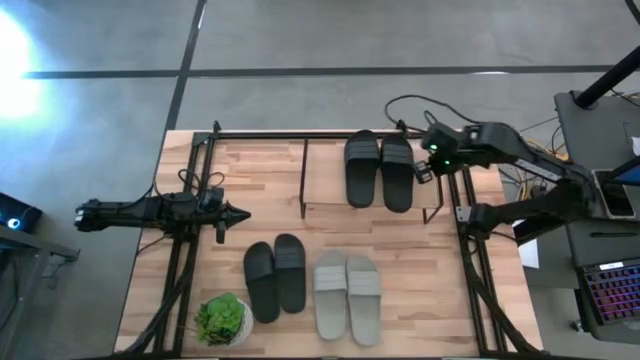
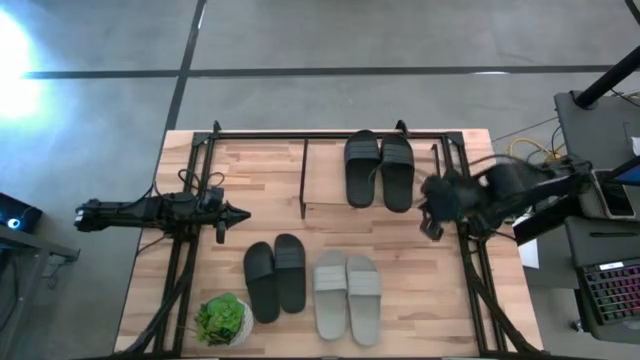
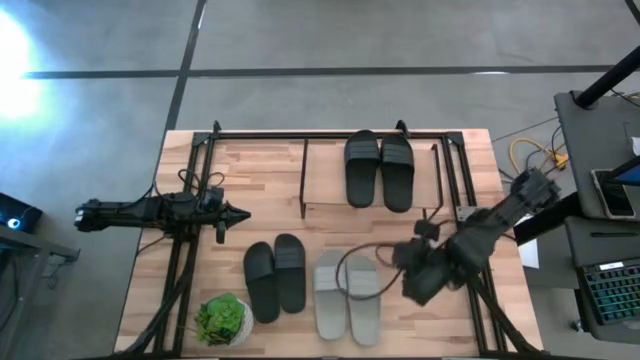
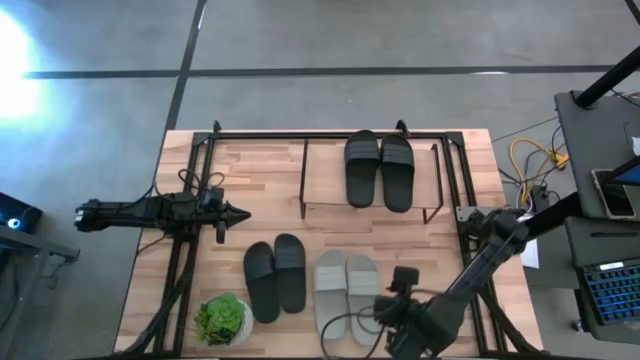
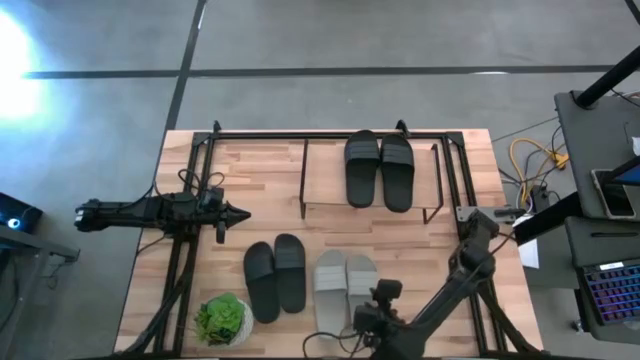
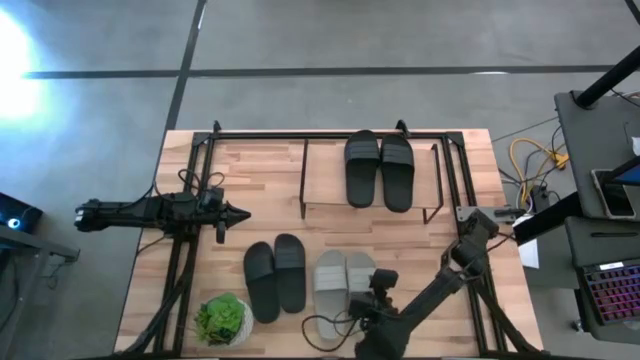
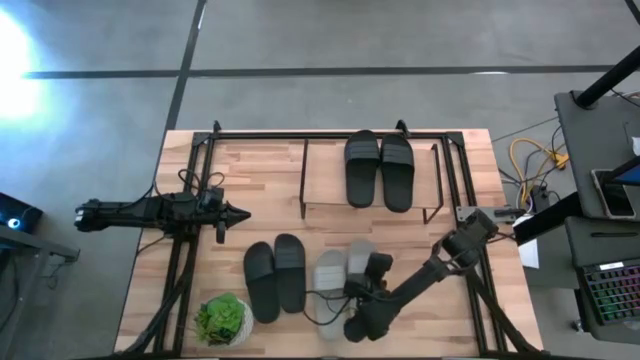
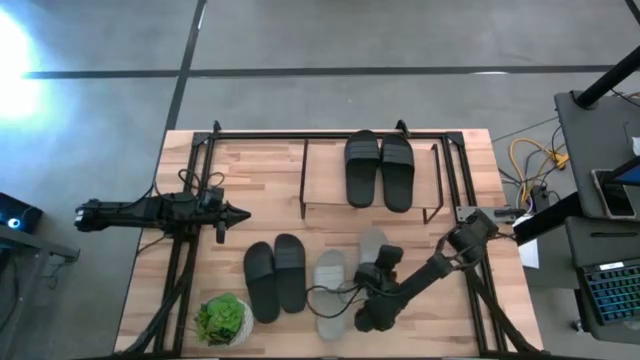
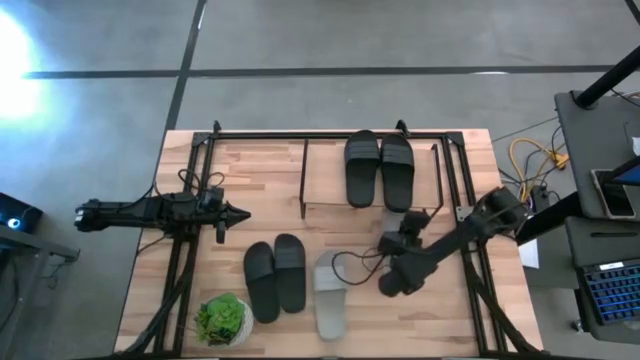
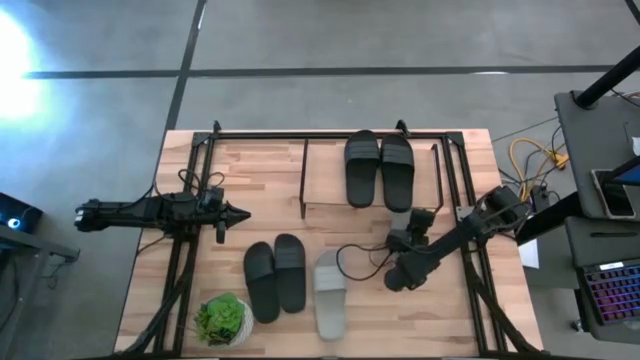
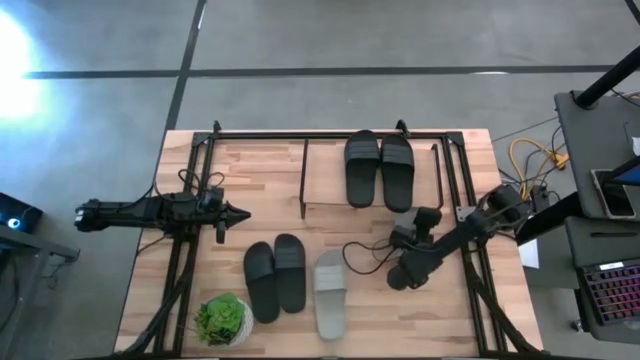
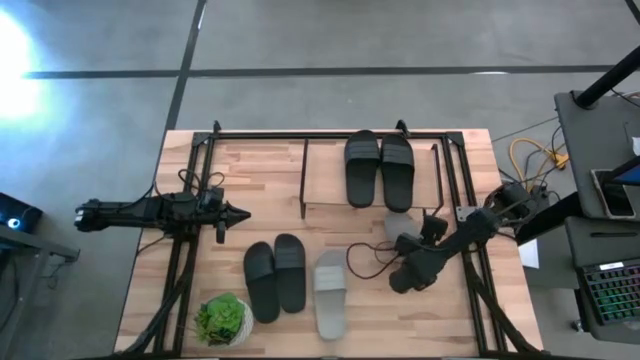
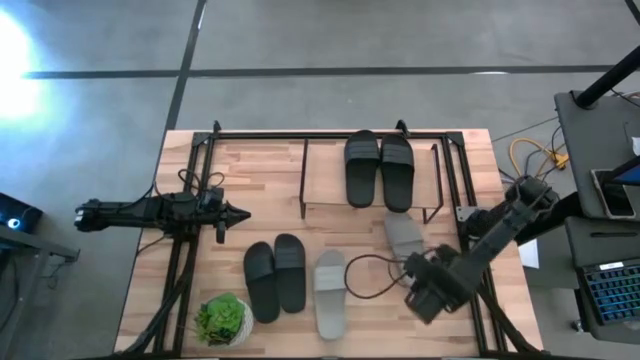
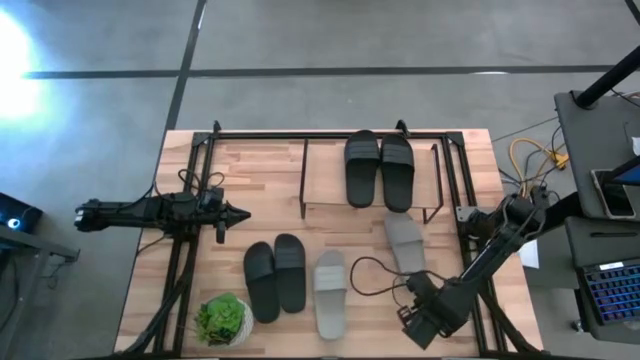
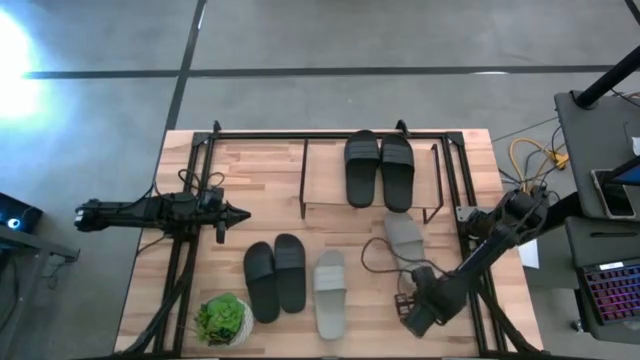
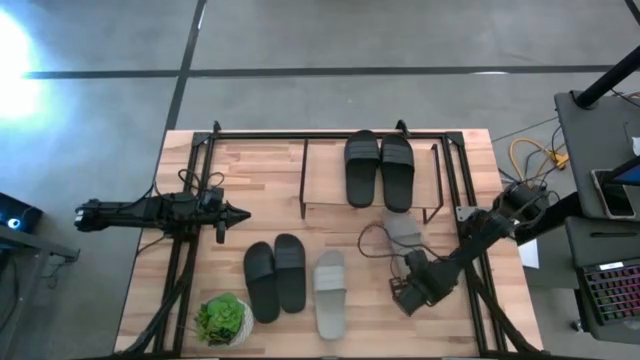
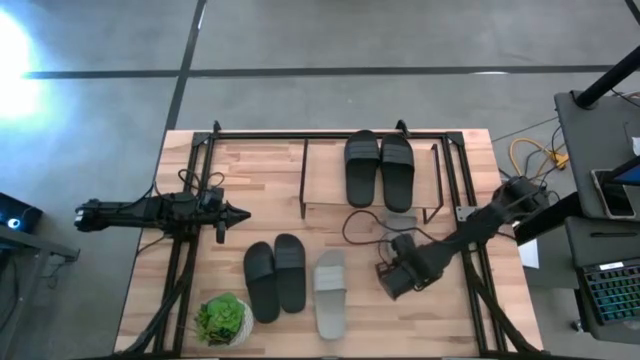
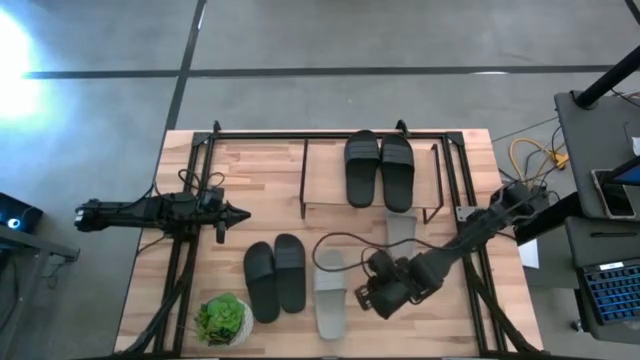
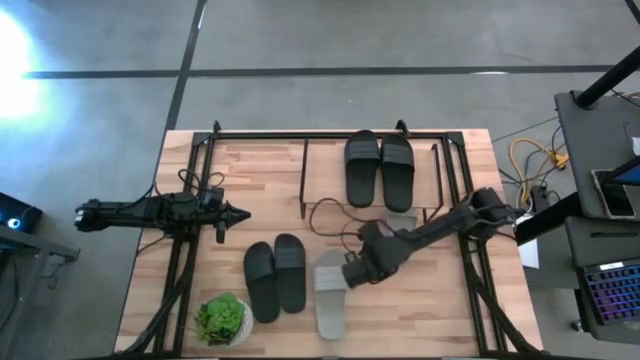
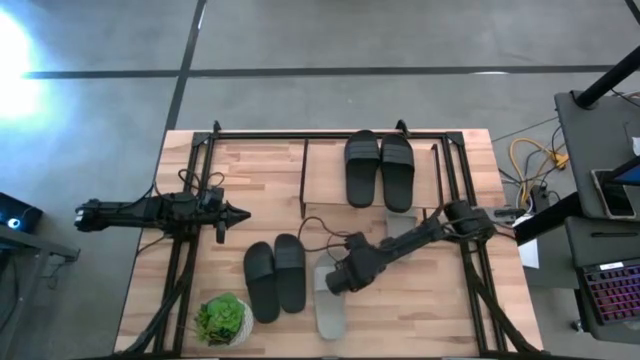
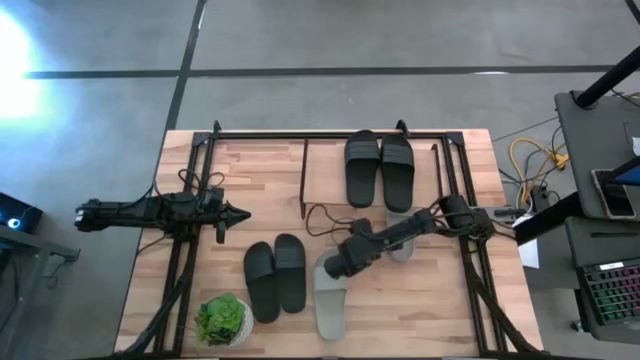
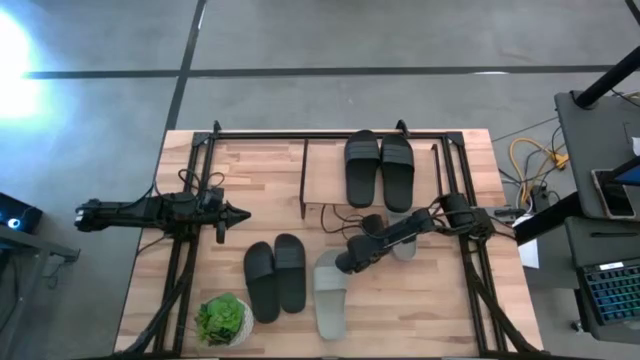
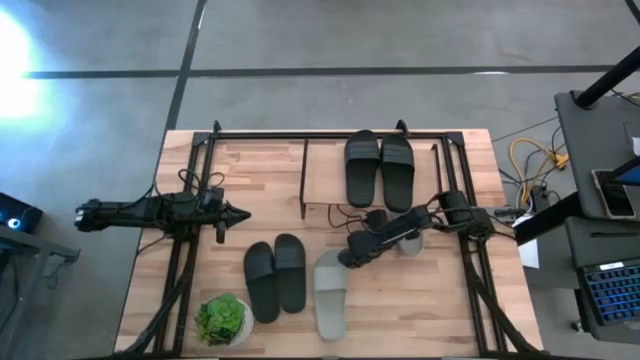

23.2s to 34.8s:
Task: Pick and place slides into the shelf
Put the right gray slide under the shelf

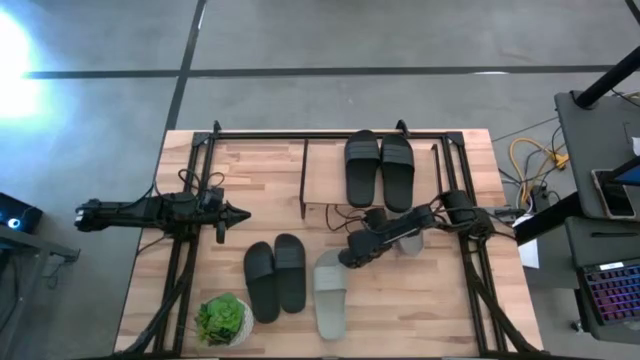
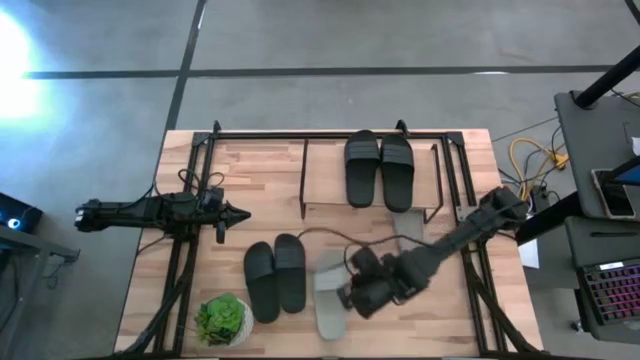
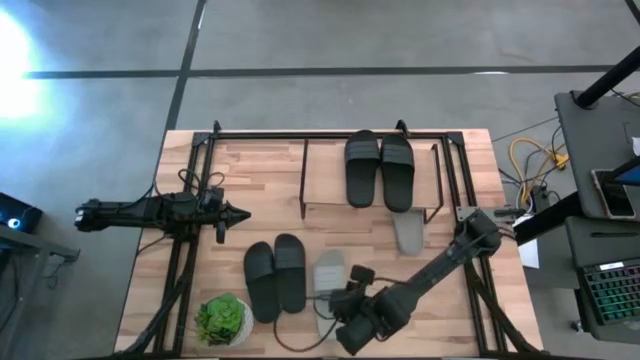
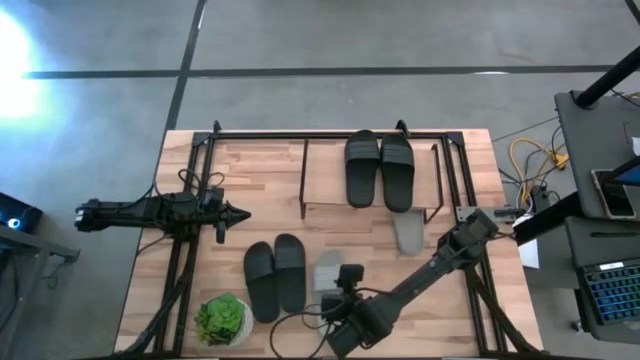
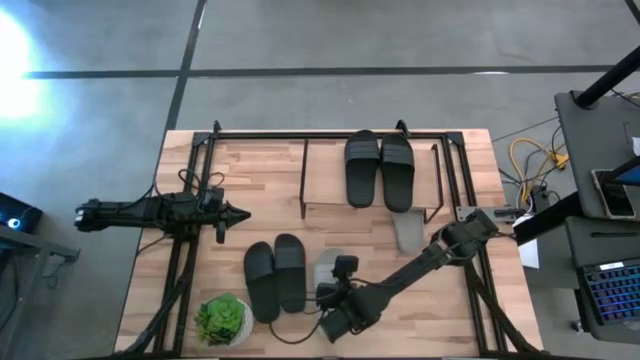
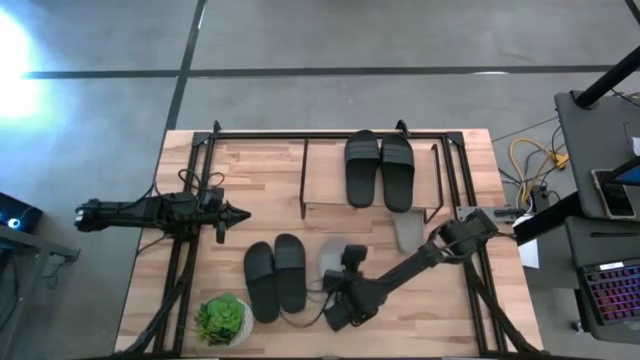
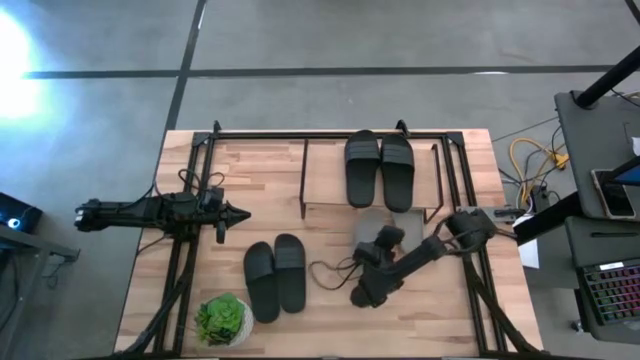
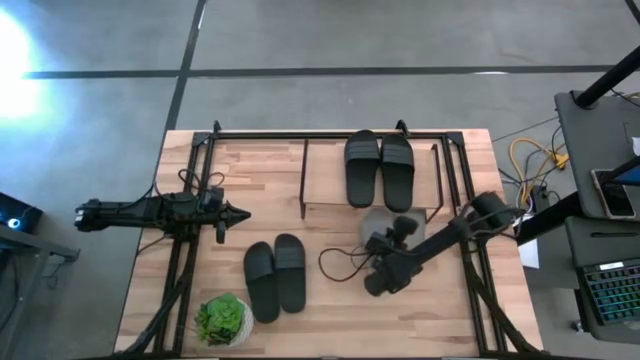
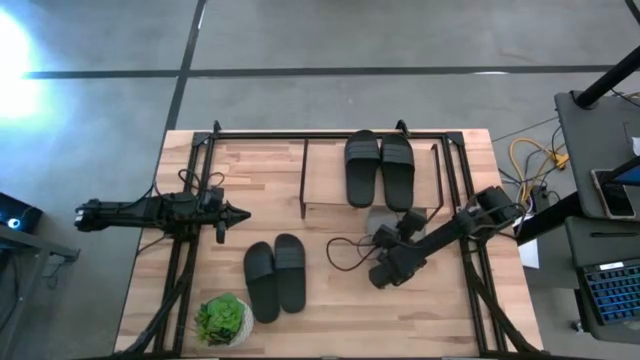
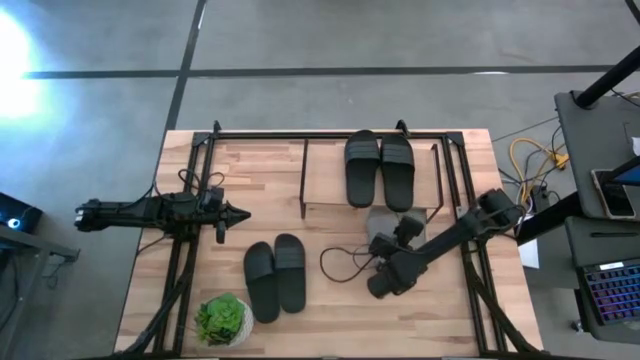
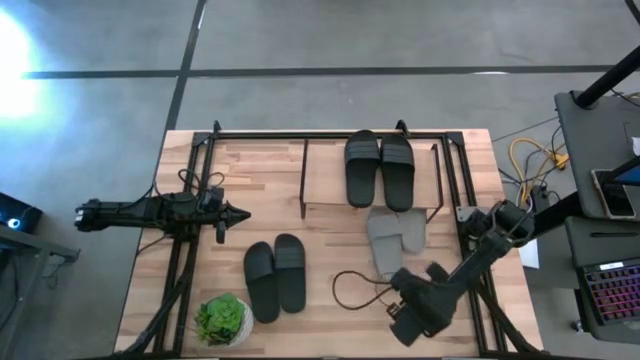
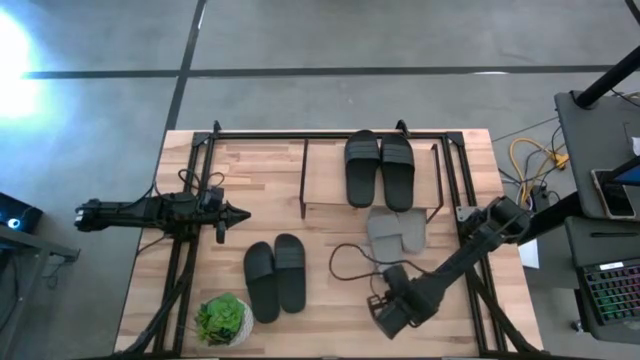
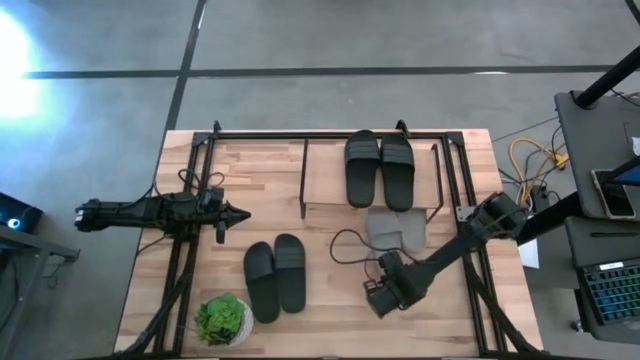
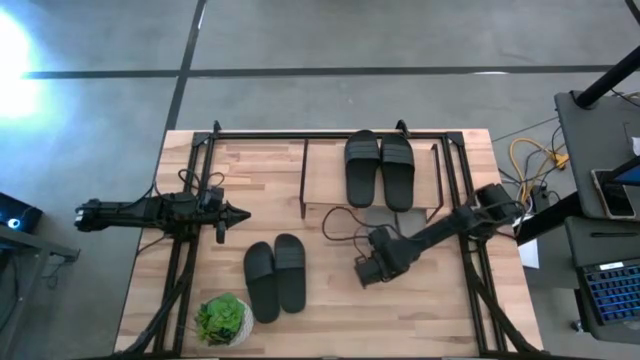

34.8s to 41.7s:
Put the gray slide under the shelf

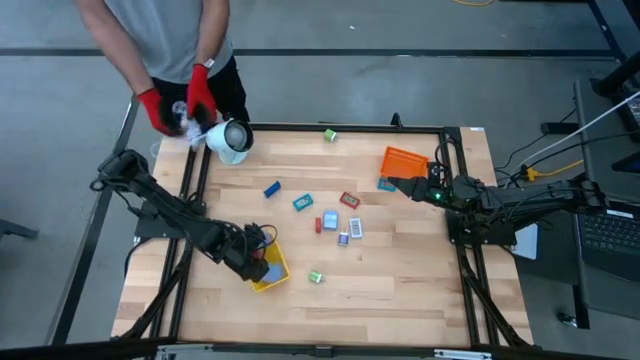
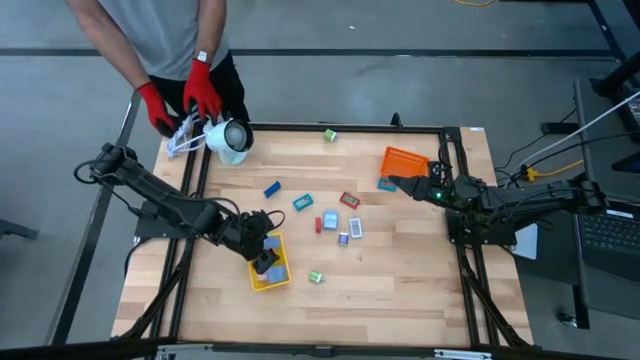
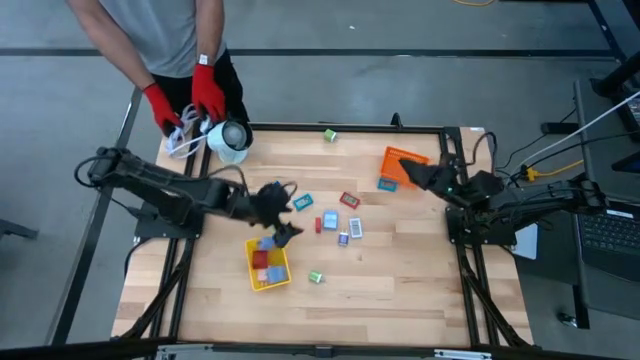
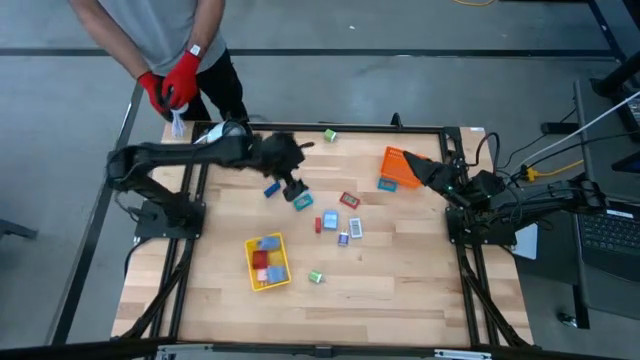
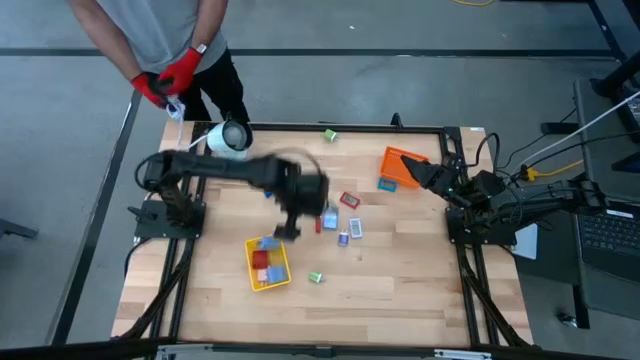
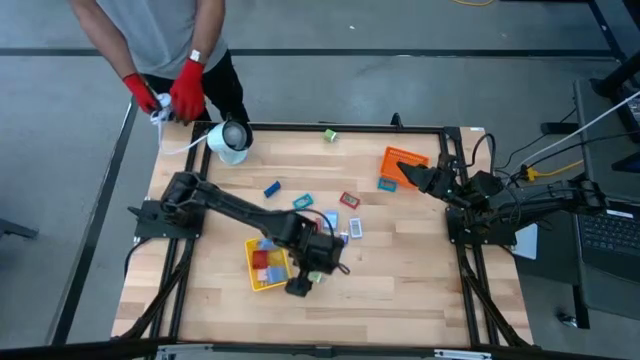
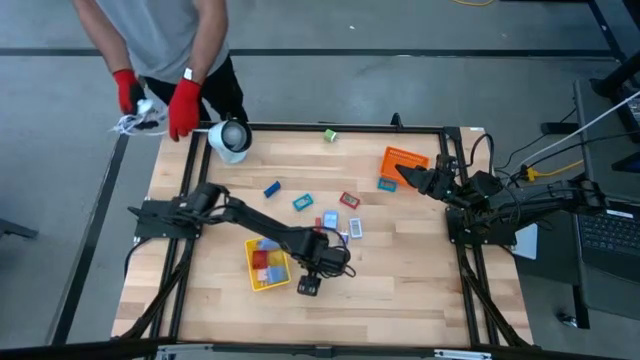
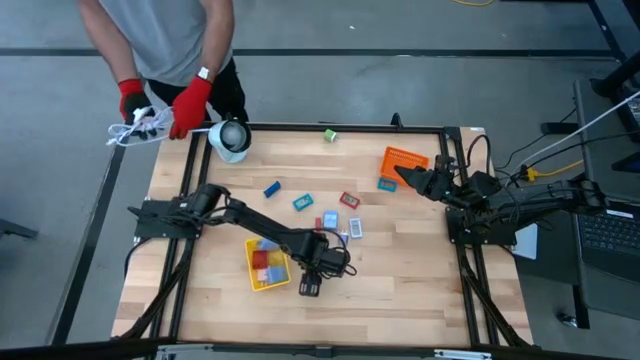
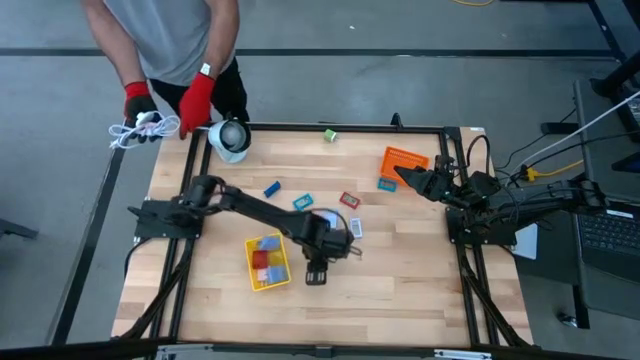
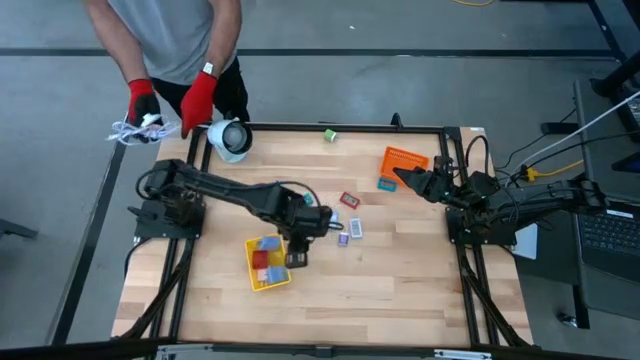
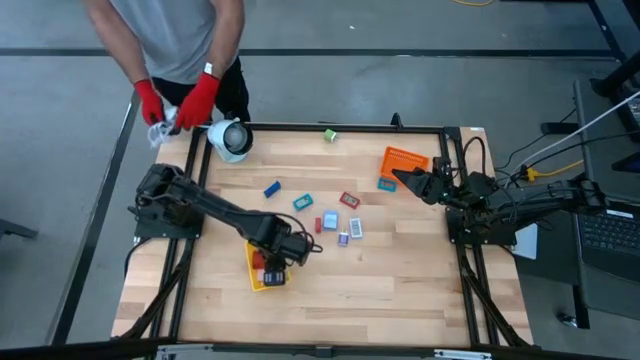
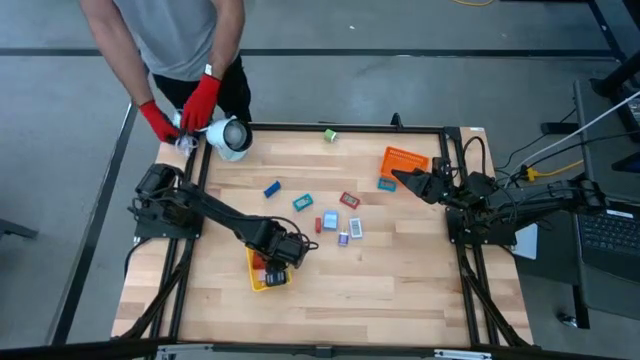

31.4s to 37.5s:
Task: Pick & Place Office items
Put the bottom green charger adapter into the yellow bin
